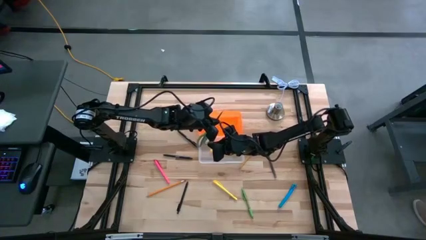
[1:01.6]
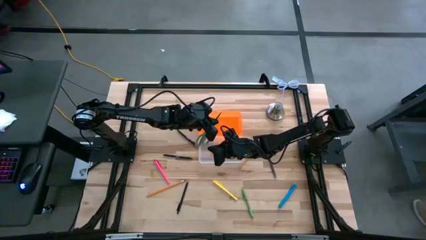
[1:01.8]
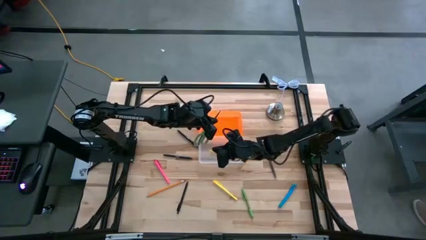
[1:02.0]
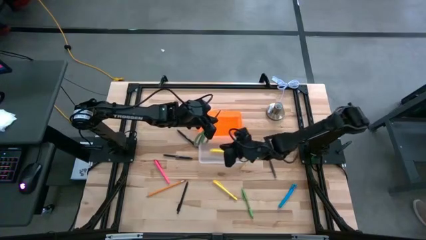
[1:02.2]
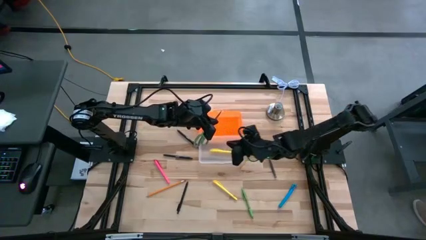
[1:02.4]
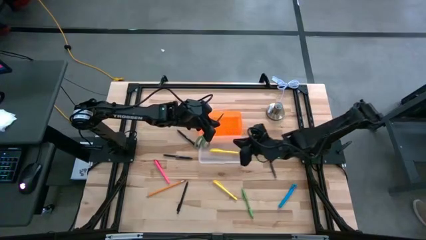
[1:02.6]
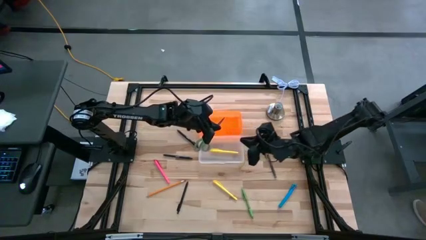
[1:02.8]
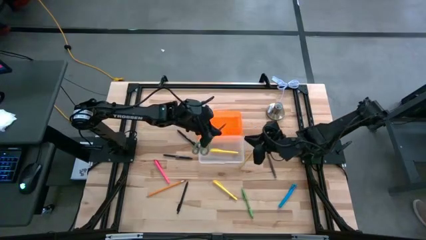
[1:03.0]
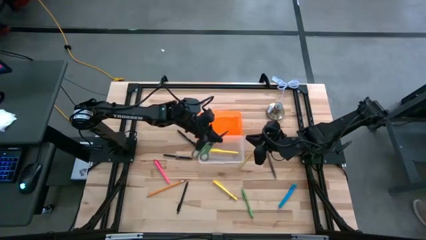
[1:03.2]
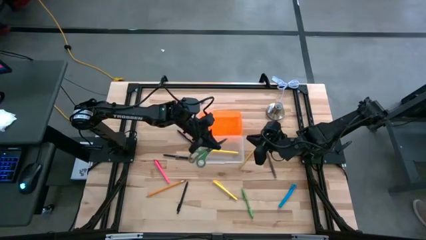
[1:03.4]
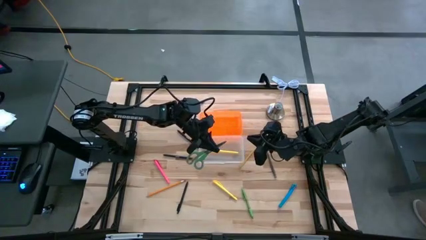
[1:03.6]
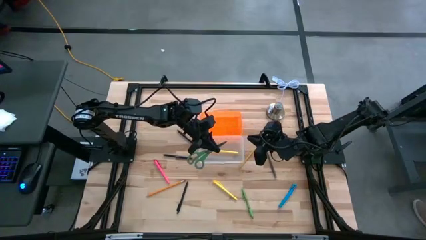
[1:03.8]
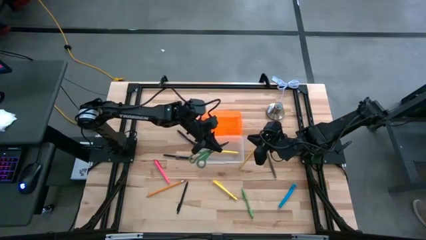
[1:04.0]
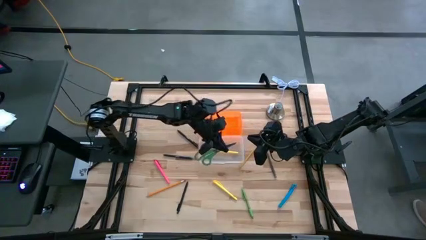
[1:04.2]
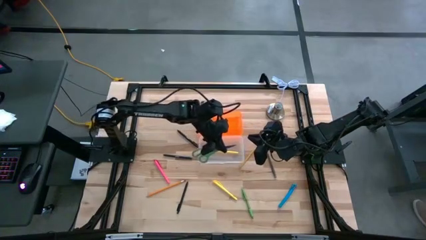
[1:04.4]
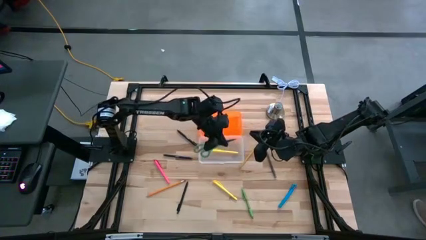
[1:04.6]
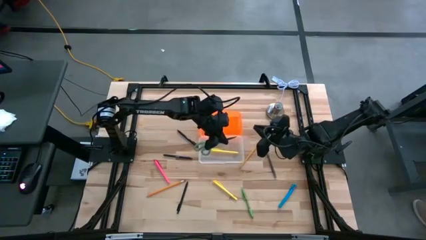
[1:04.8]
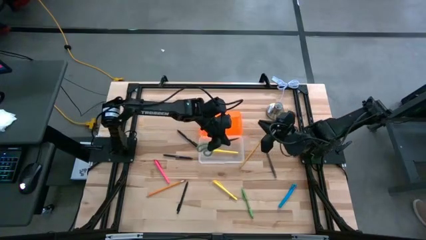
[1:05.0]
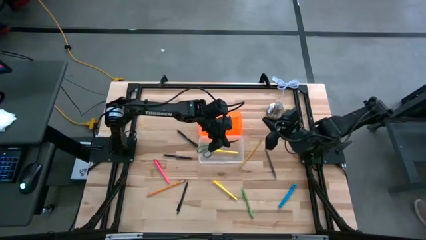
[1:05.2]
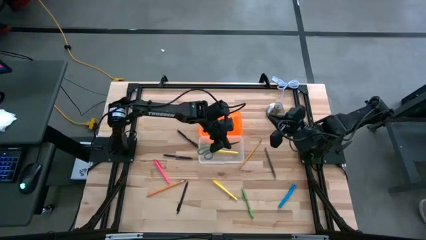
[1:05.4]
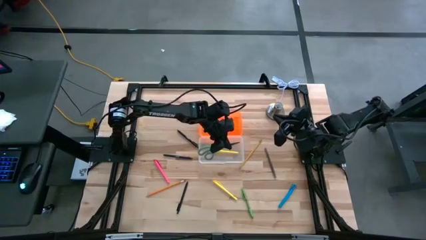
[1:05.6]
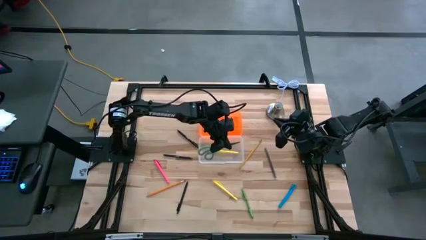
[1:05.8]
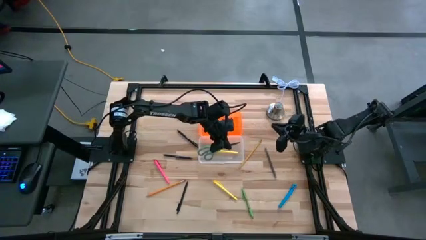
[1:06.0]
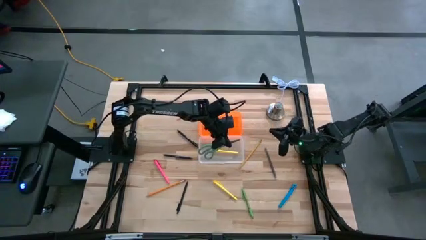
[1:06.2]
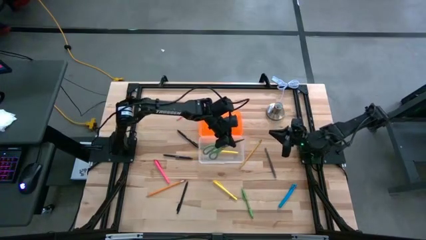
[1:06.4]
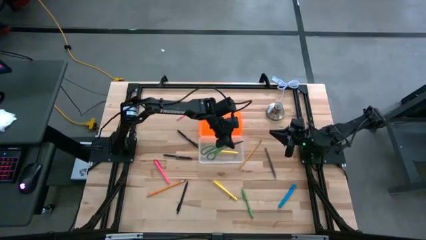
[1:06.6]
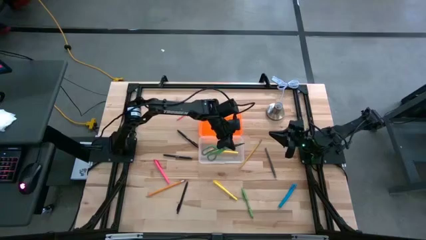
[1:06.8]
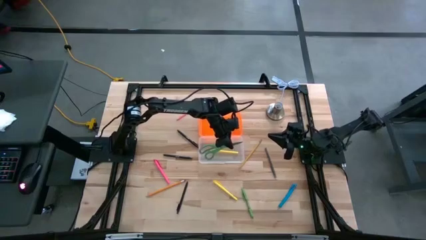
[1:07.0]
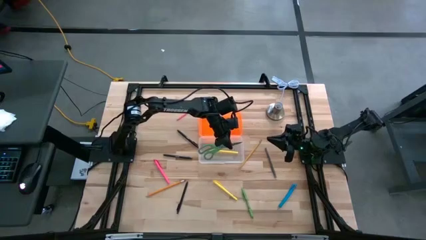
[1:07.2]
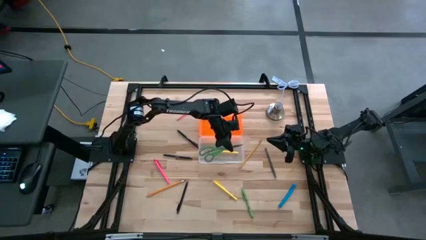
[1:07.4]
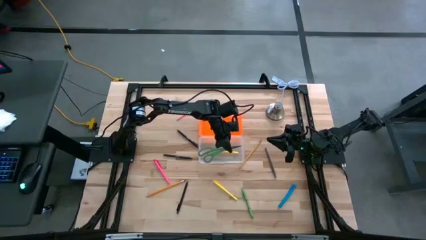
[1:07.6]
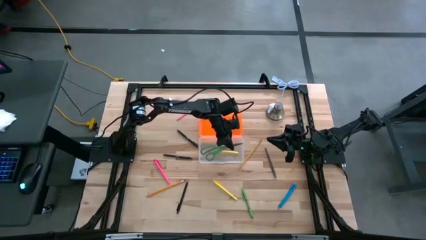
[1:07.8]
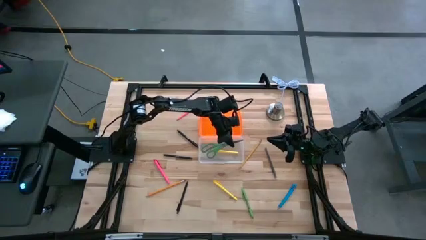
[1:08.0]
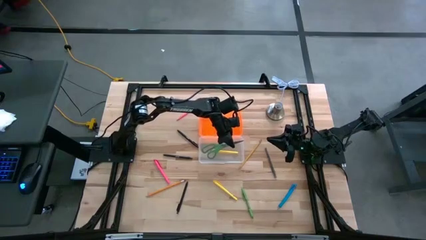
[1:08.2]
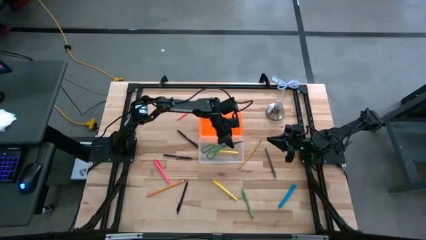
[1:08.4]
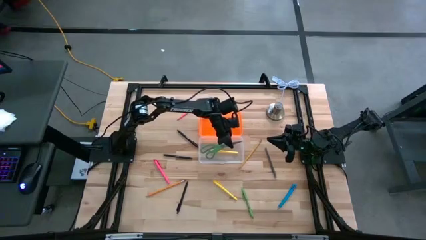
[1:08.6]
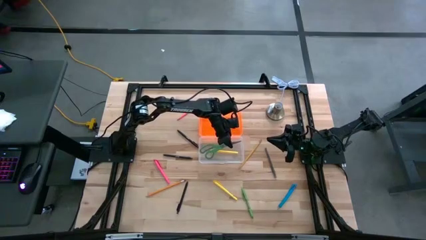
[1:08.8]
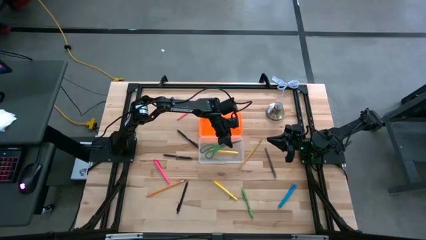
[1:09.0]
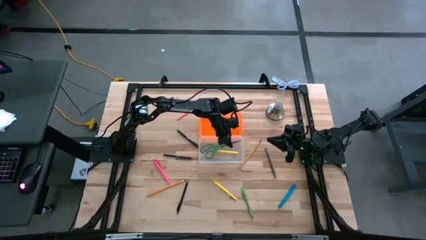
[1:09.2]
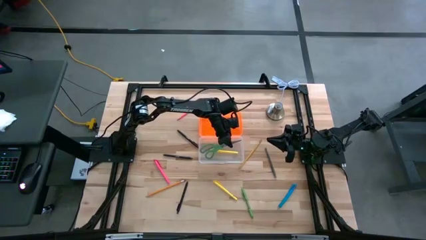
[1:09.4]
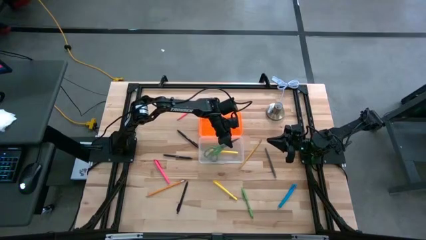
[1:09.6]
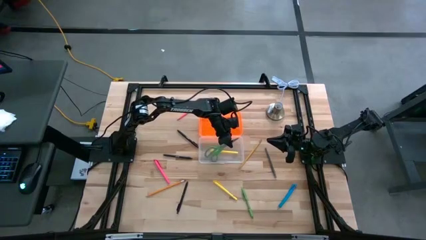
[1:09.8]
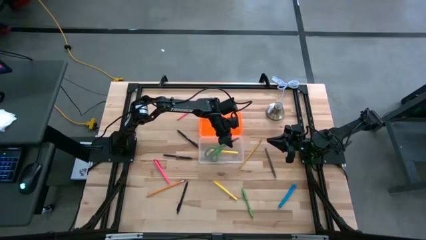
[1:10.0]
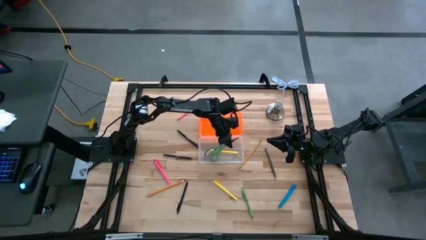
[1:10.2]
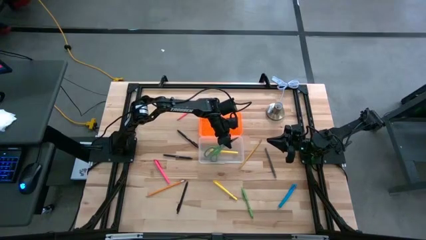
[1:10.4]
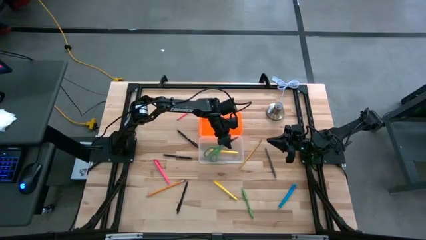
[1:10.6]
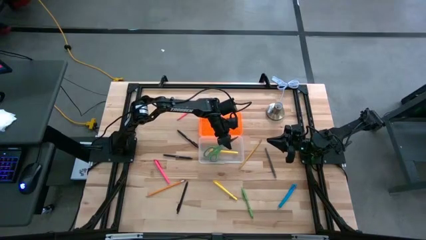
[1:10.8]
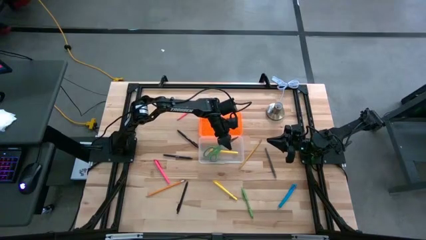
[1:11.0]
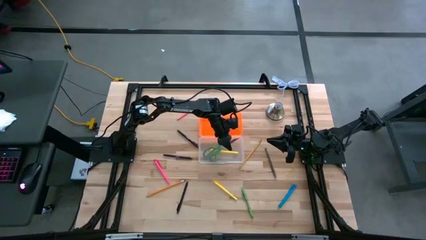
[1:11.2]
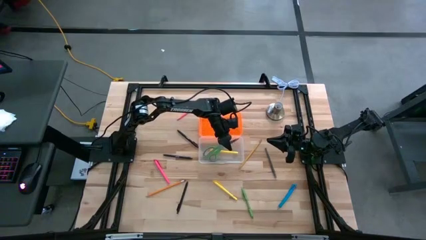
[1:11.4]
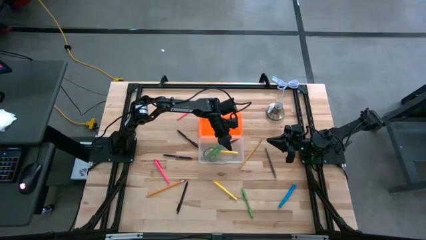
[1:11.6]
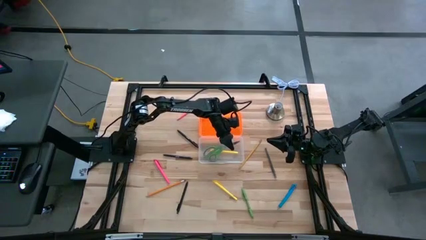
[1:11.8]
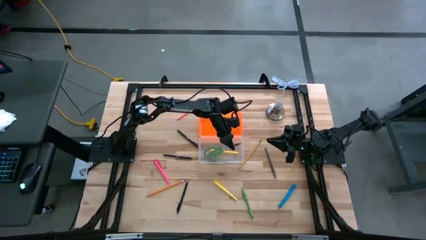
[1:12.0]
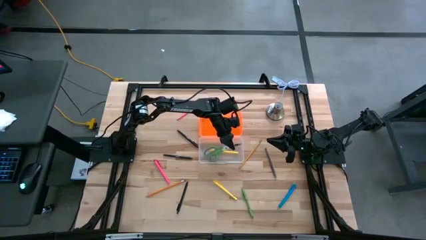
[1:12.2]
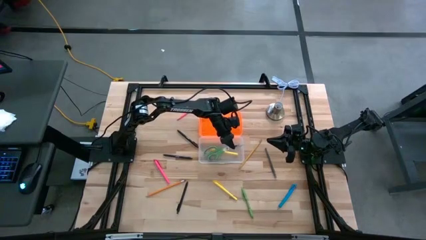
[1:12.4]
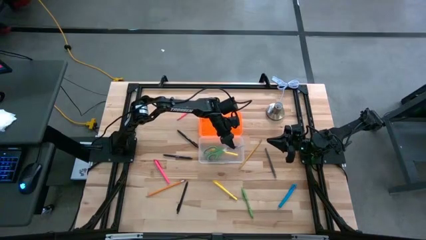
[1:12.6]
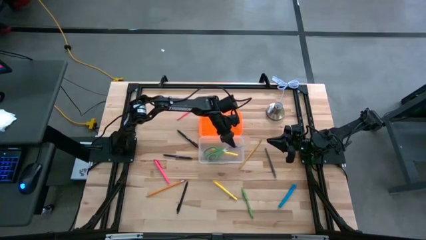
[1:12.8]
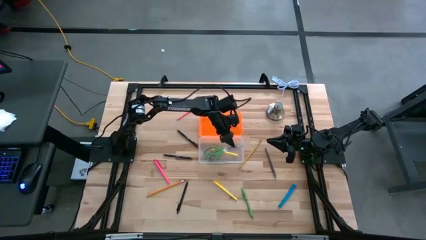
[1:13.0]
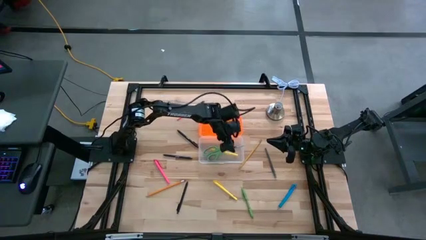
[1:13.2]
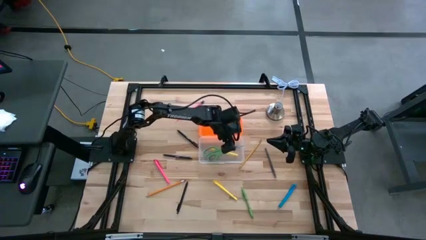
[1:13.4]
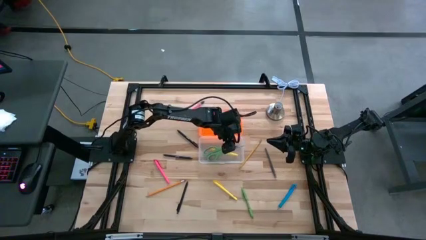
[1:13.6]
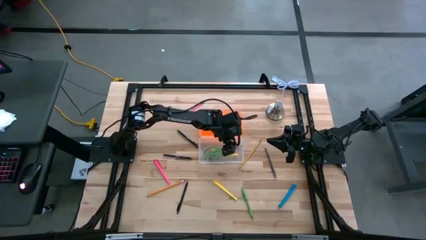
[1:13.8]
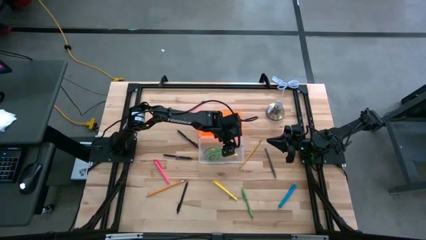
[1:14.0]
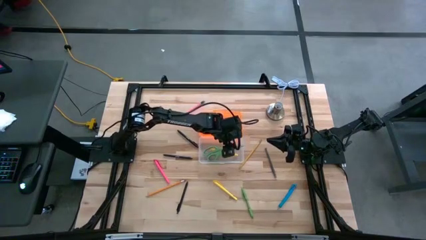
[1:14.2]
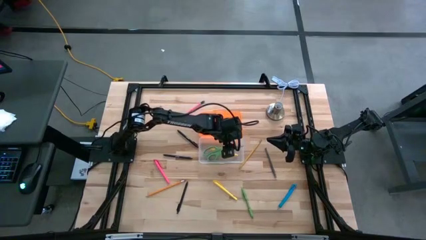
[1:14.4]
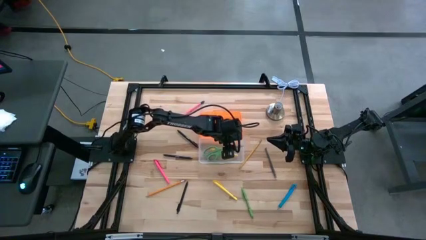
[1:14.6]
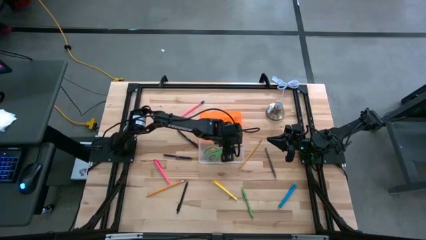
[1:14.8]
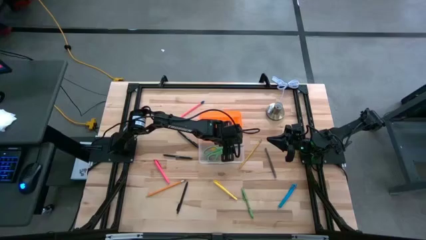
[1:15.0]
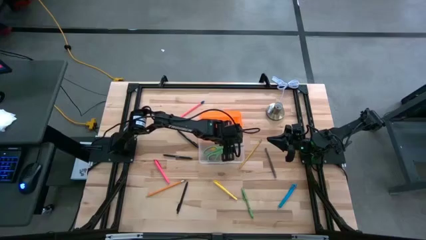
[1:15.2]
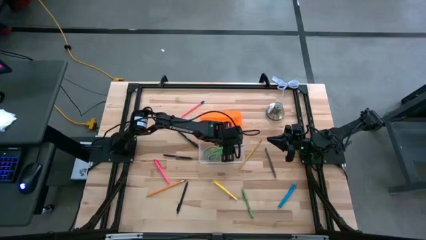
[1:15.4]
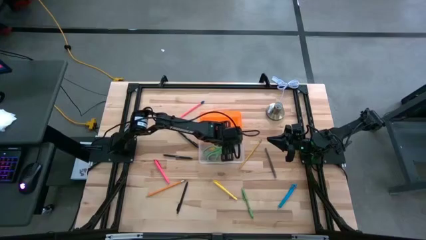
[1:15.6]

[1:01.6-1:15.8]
Task: Pick & place school supplies into a supply box
Put the green scissor into the container
